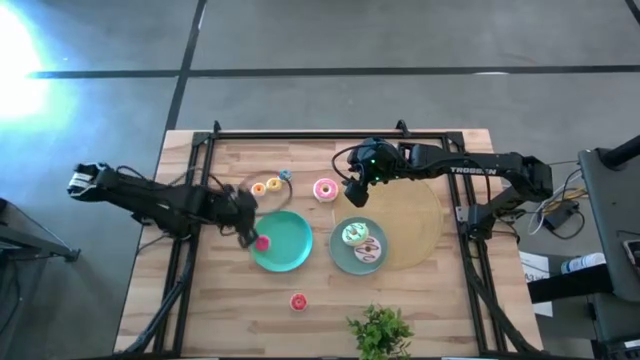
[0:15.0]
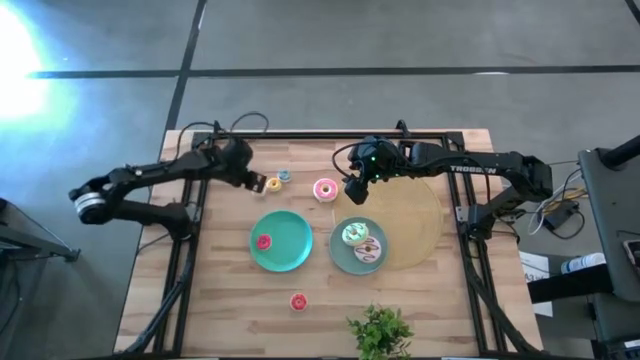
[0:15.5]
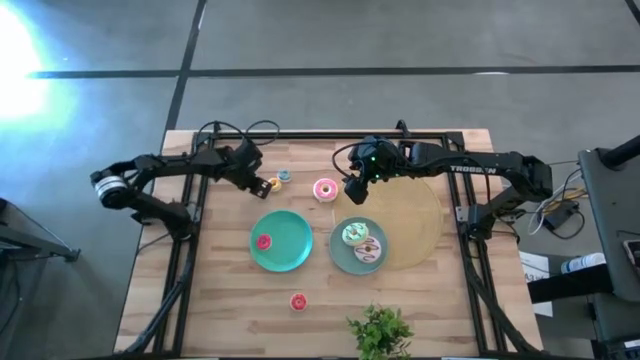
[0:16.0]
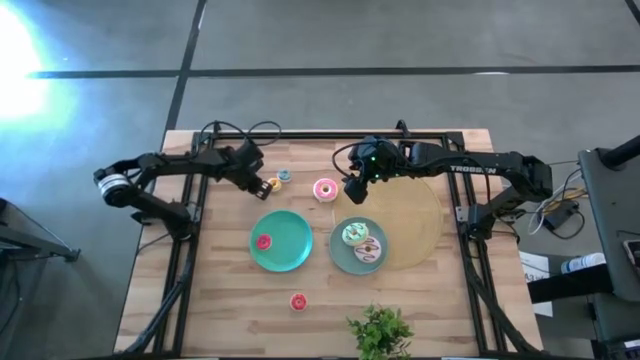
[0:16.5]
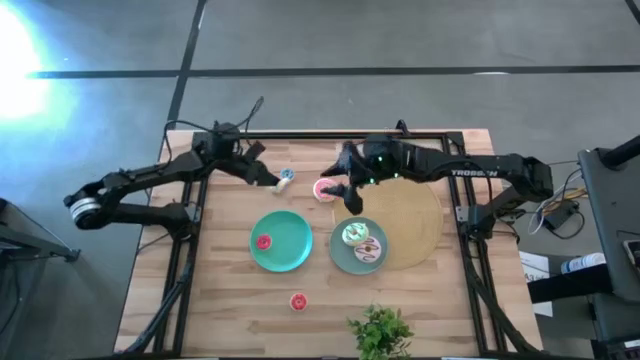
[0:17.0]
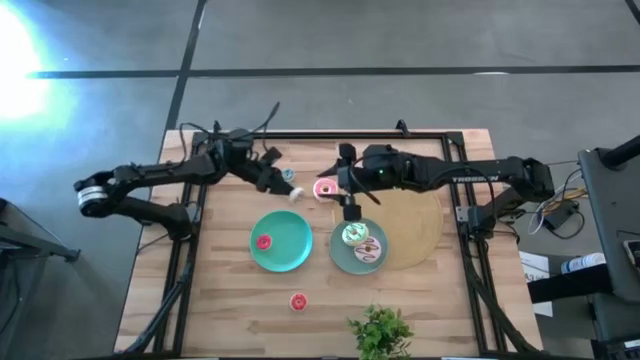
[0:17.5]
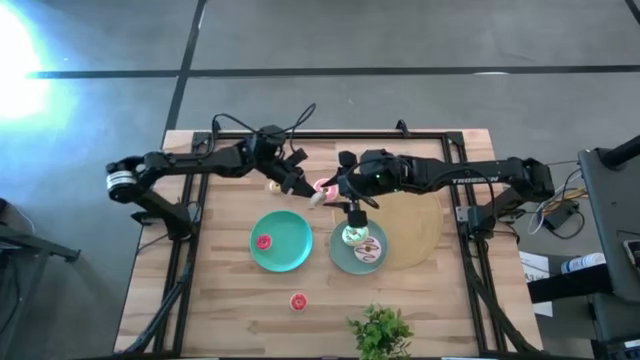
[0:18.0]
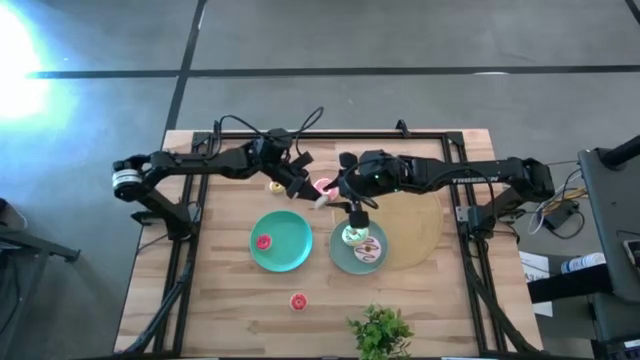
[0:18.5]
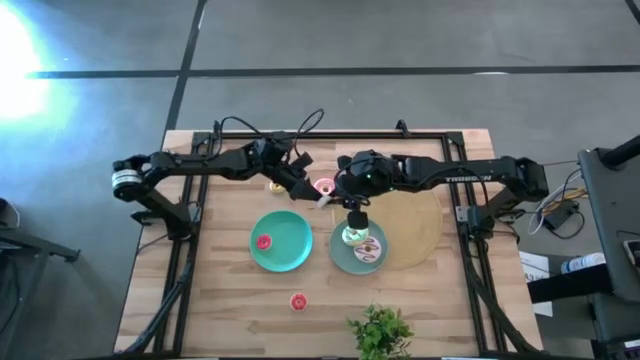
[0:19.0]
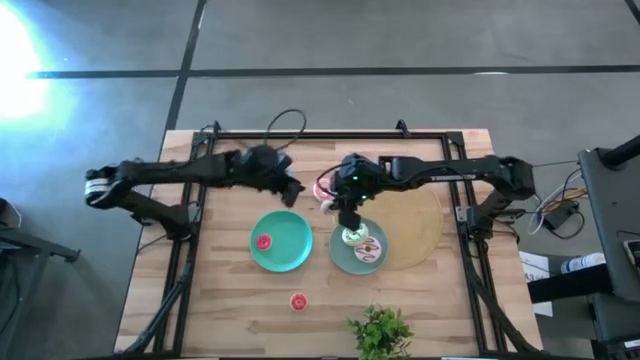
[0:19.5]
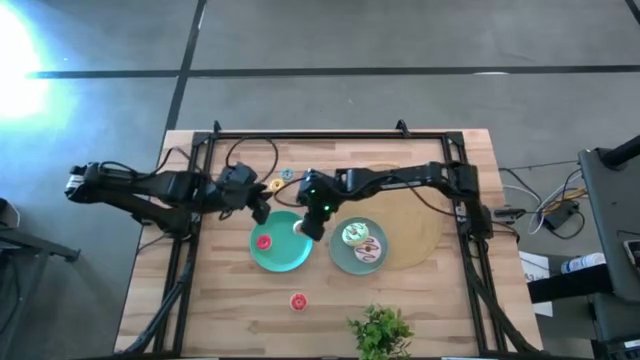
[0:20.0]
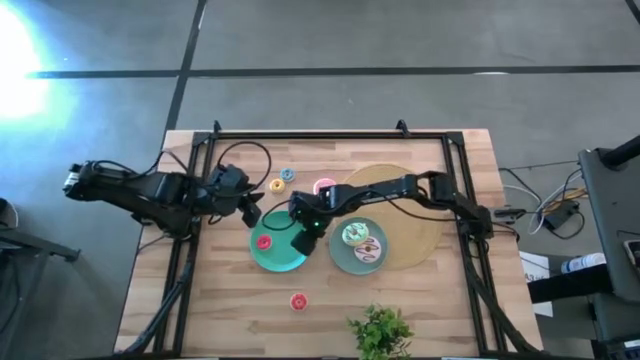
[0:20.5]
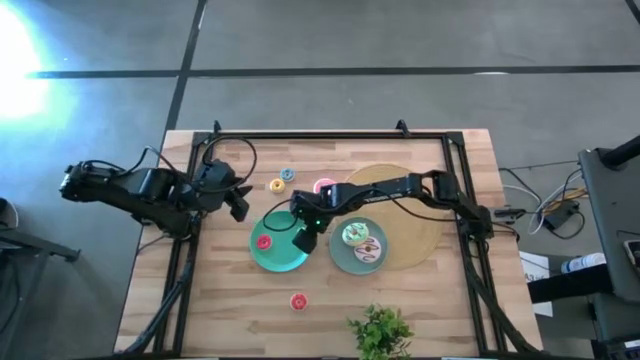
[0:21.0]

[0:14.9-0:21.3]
Task: Pick & Place donuts
Put the small white donut on the blue plate

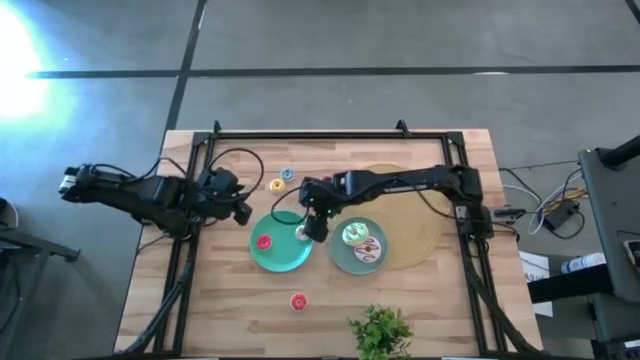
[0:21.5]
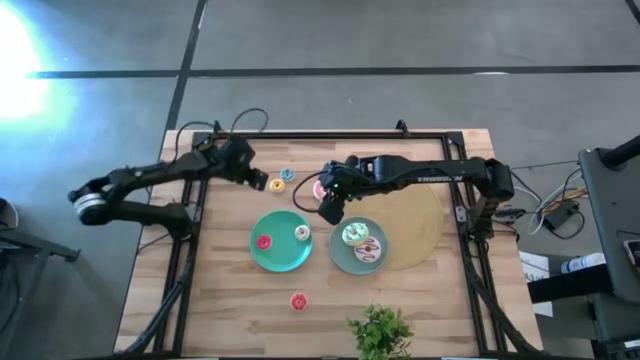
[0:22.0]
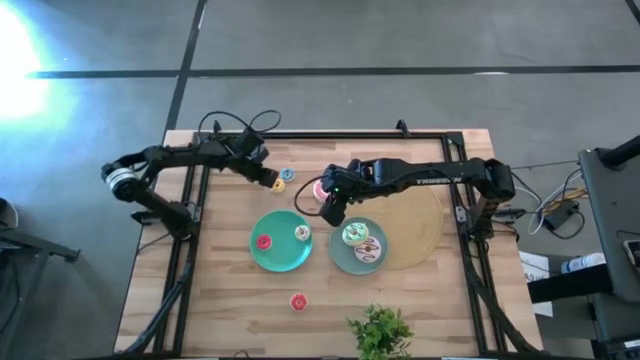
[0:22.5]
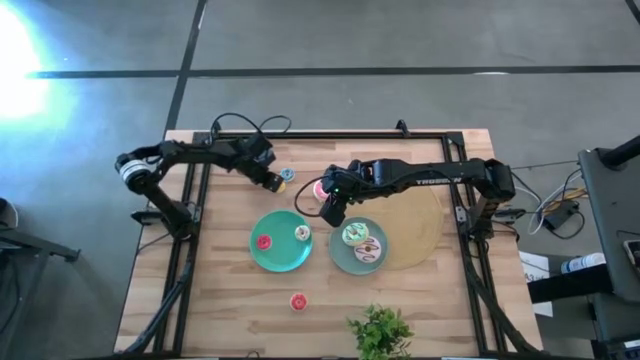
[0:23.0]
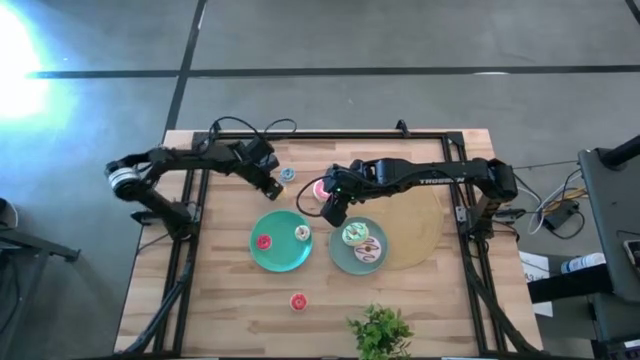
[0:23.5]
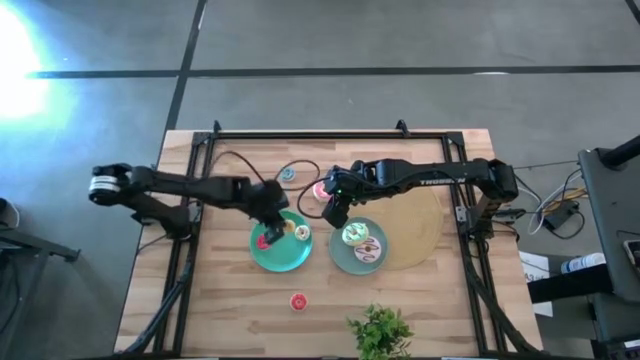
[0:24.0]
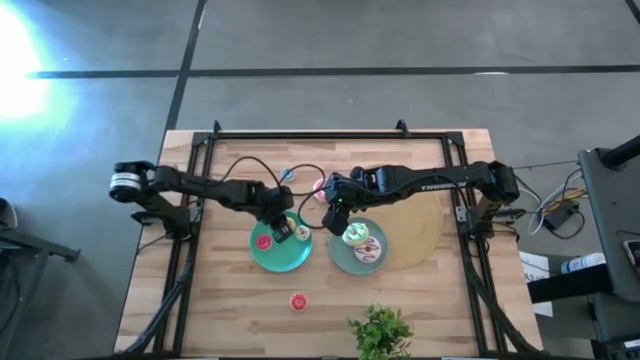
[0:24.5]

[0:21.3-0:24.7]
Put the small yellow donut on the blue plate

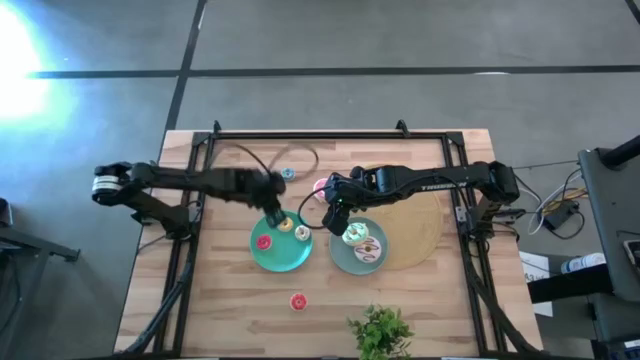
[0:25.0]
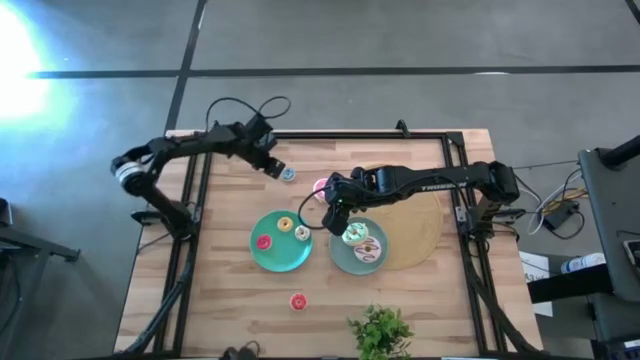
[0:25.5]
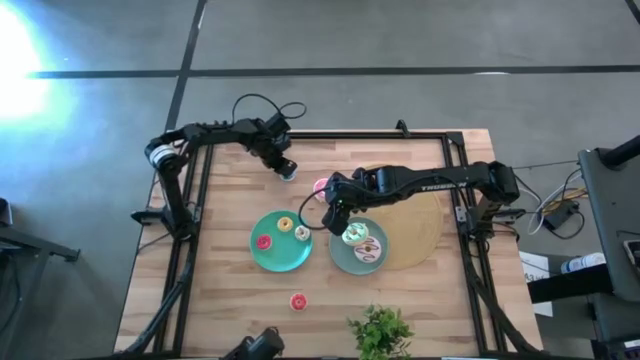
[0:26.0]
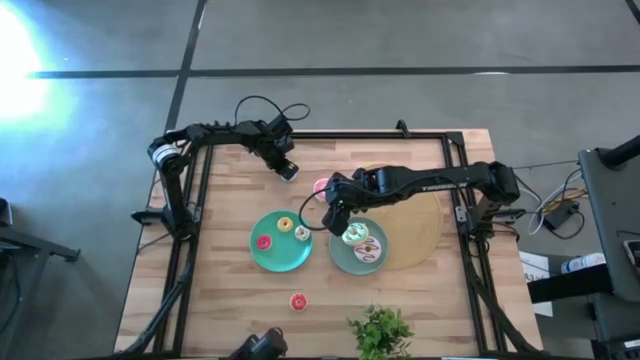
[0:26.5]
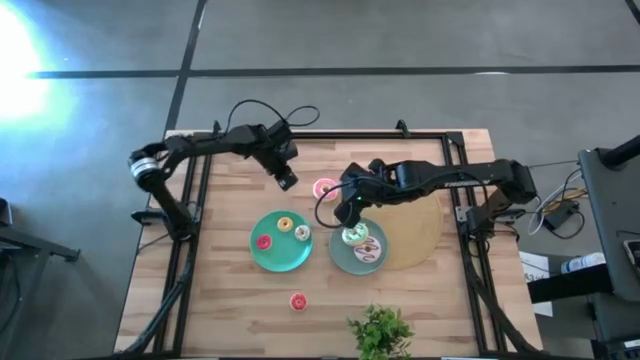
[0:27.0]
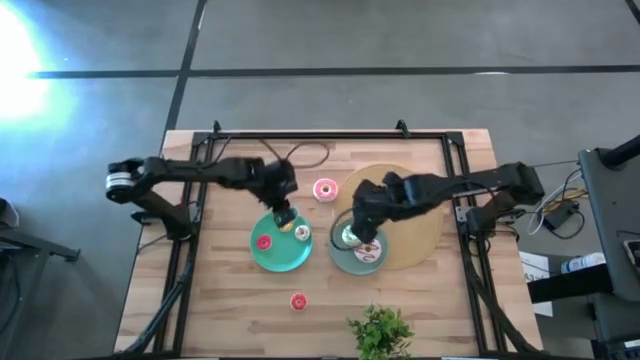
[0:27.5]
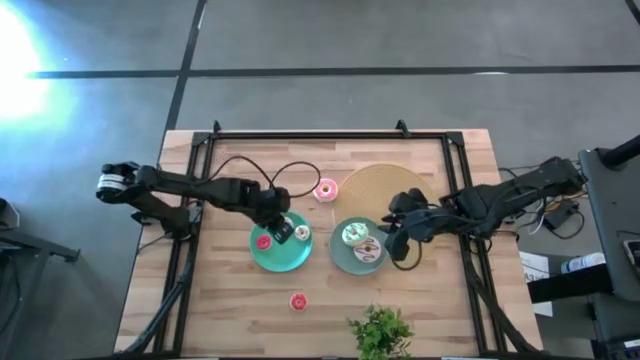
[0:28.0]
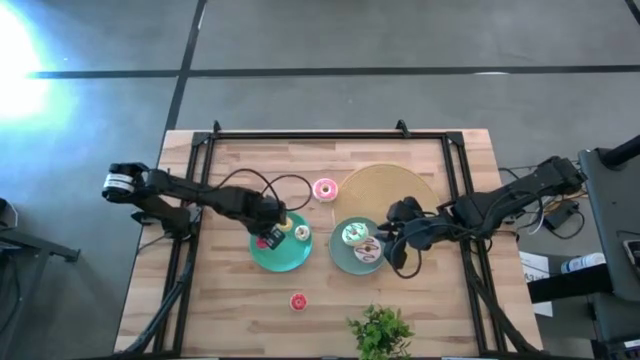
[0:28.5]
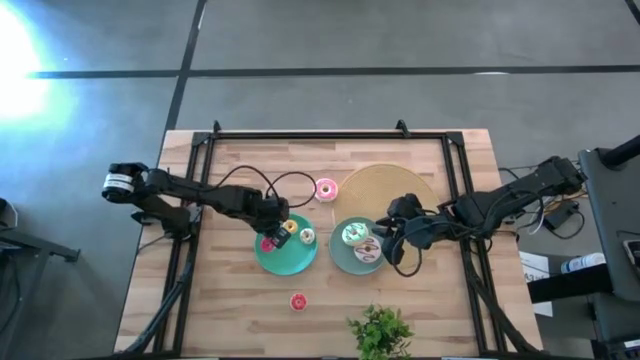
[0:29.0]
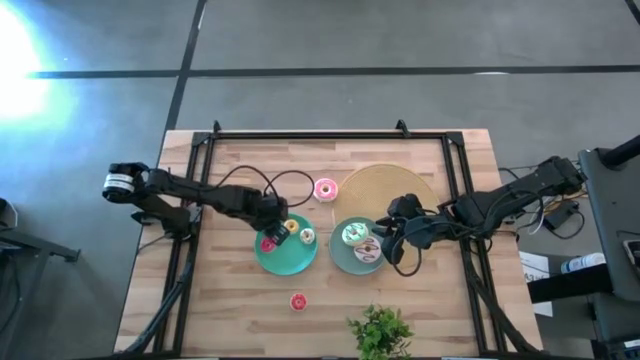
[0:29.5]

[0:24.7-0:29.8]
Put the small blue donut on the blue plate

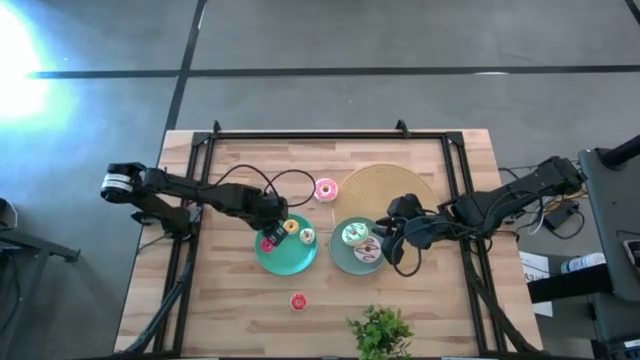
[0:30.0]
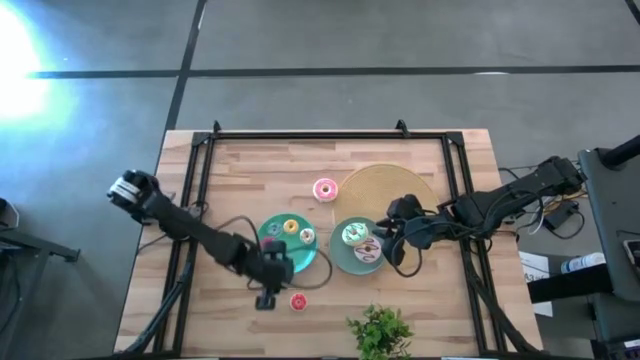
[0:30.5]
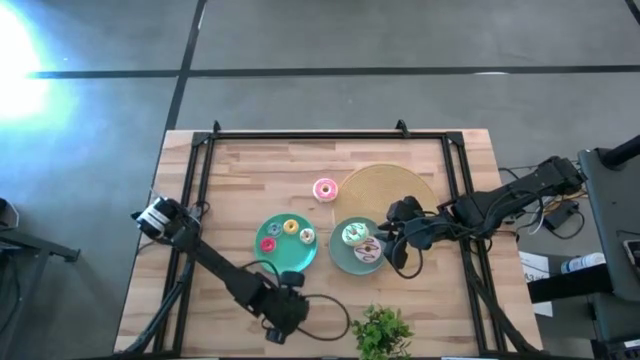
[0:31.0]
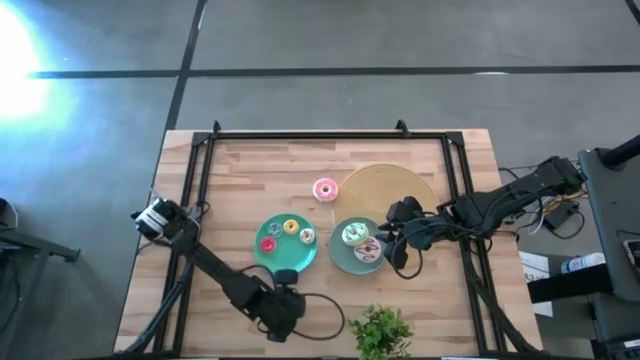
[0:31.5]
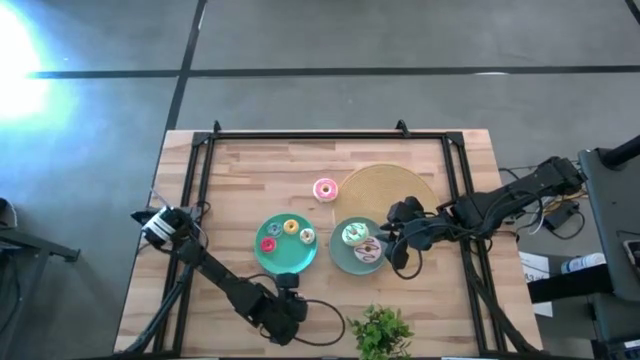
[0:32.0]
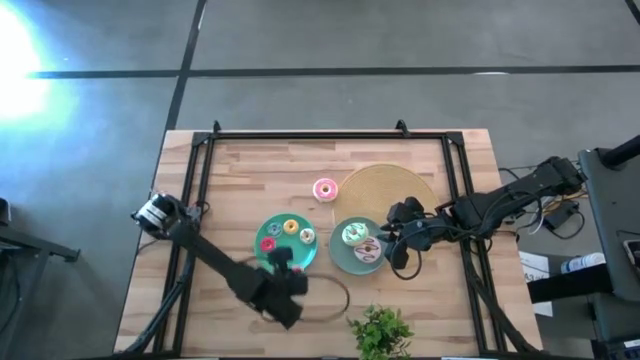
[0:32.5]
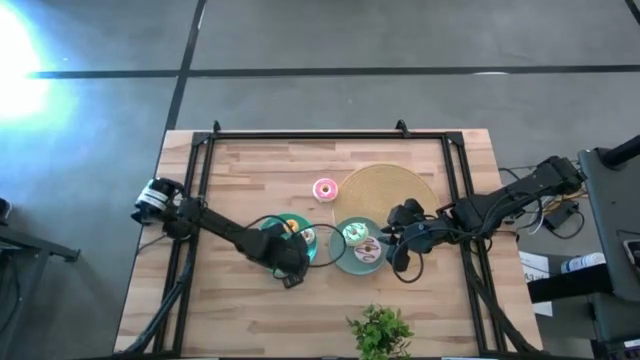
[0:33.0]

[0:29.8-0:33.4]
Put the small orange donut on the blue plate
